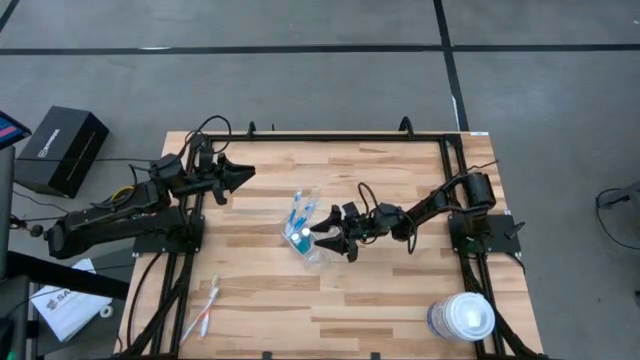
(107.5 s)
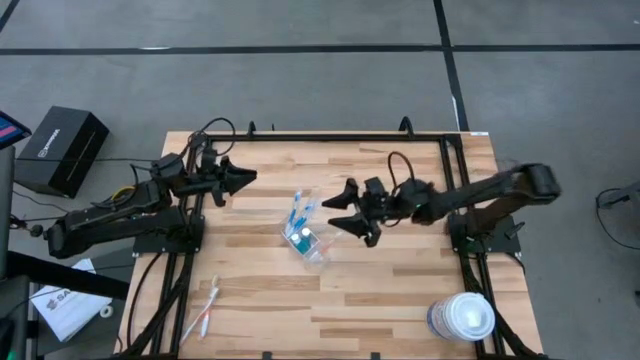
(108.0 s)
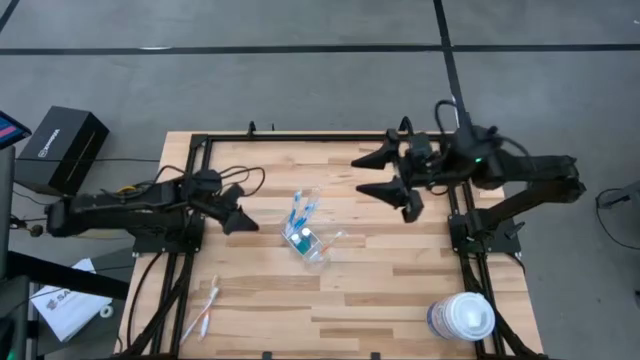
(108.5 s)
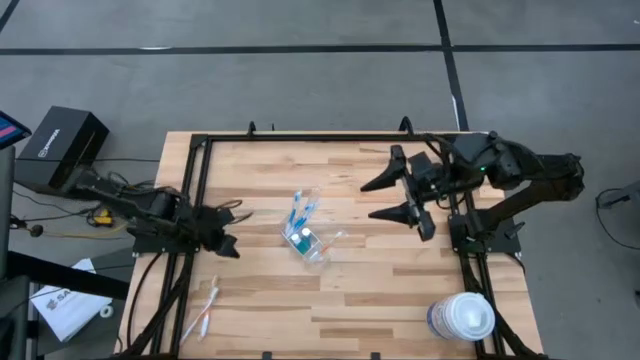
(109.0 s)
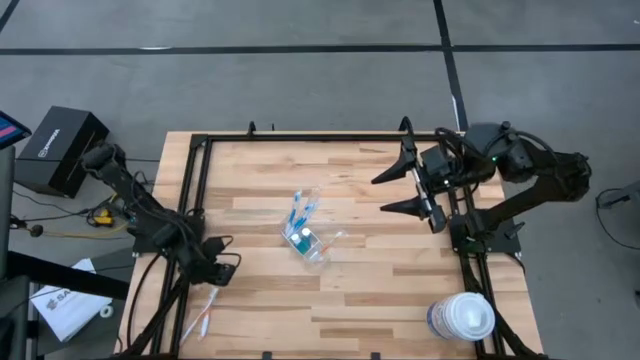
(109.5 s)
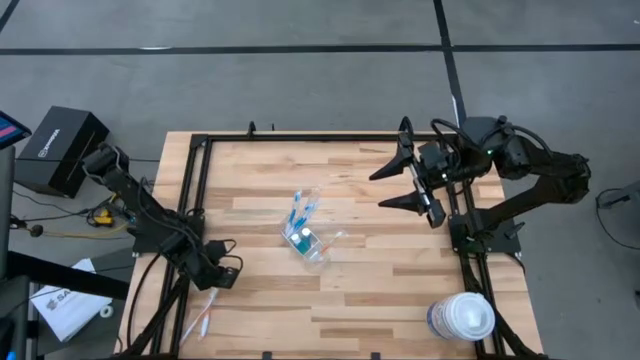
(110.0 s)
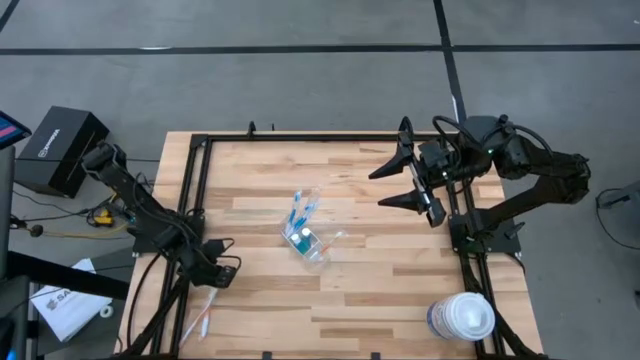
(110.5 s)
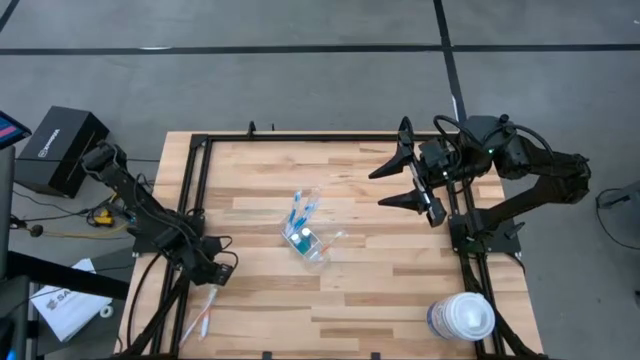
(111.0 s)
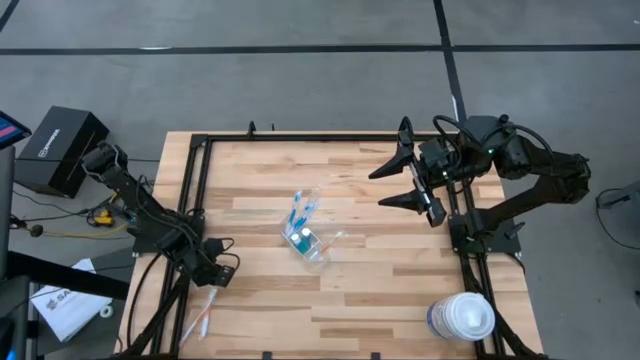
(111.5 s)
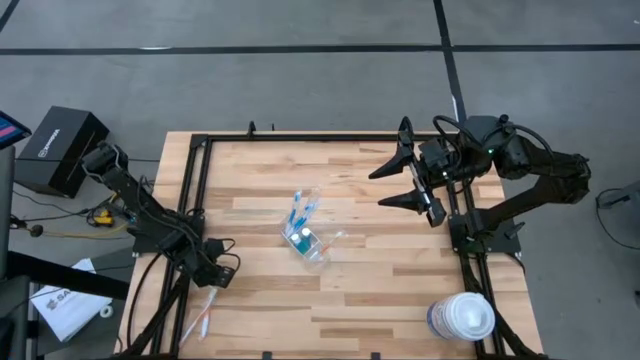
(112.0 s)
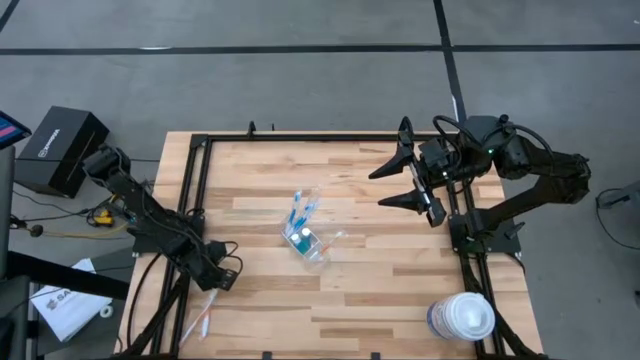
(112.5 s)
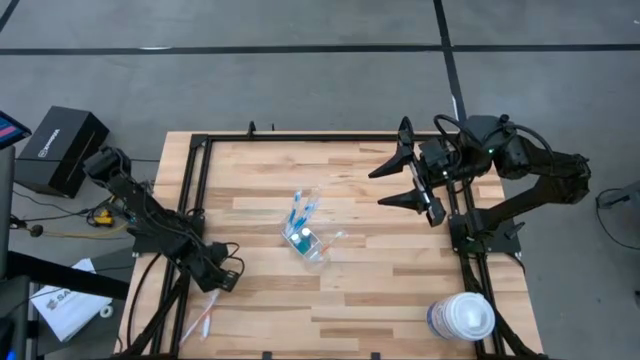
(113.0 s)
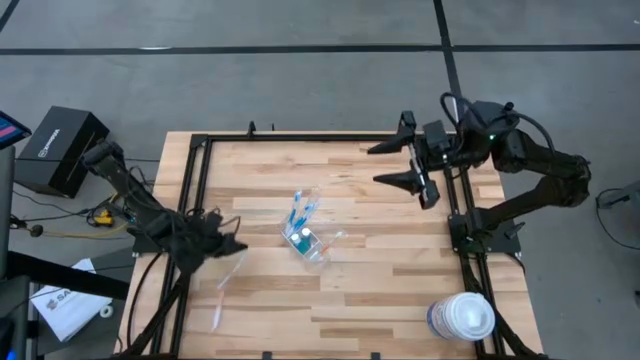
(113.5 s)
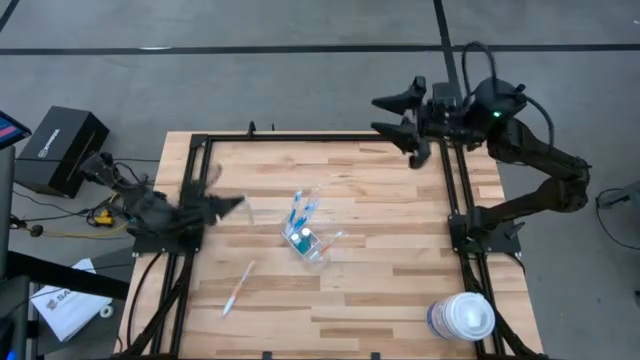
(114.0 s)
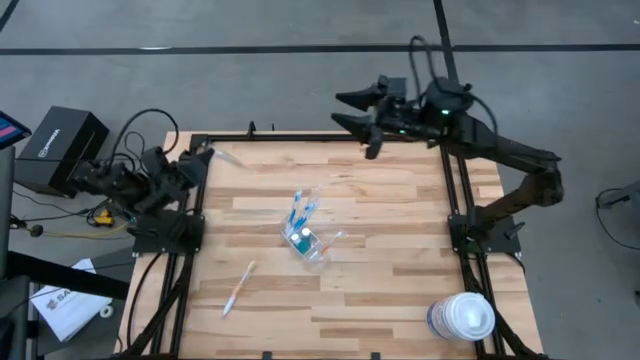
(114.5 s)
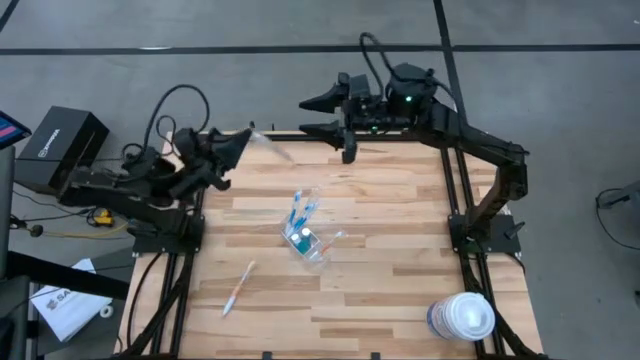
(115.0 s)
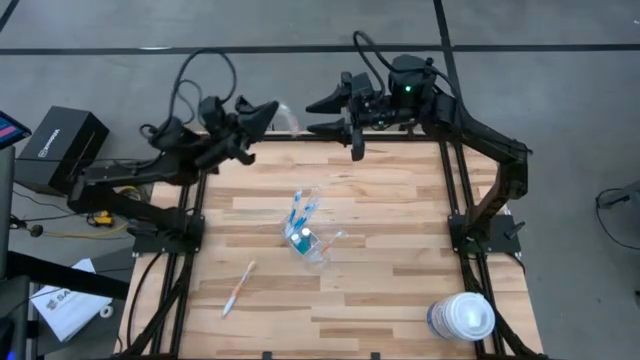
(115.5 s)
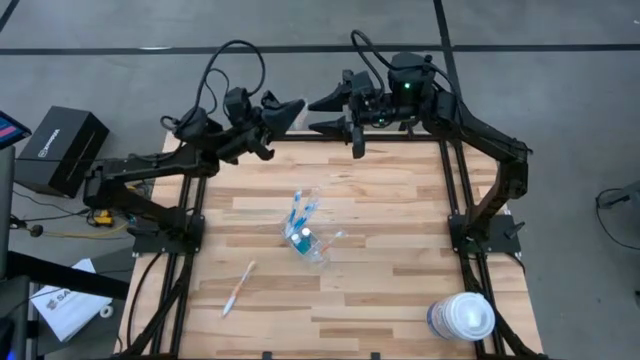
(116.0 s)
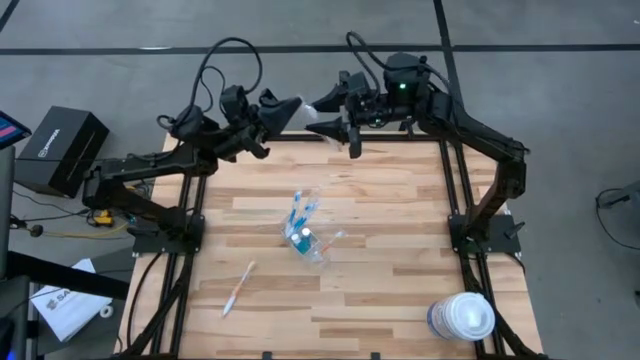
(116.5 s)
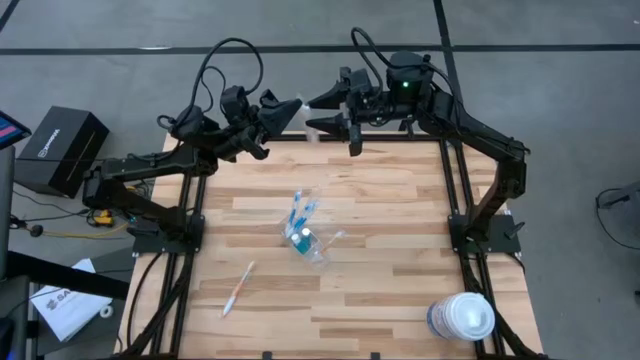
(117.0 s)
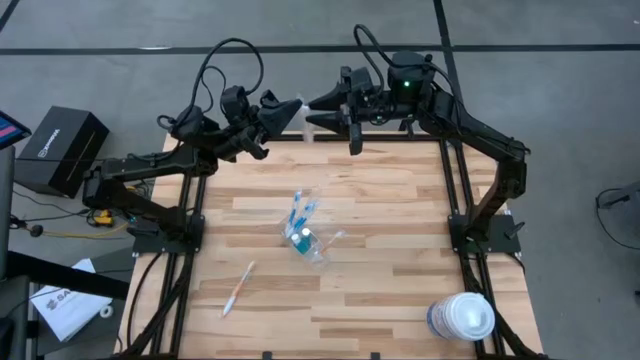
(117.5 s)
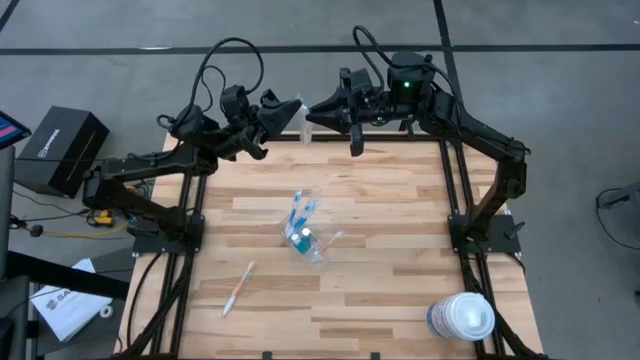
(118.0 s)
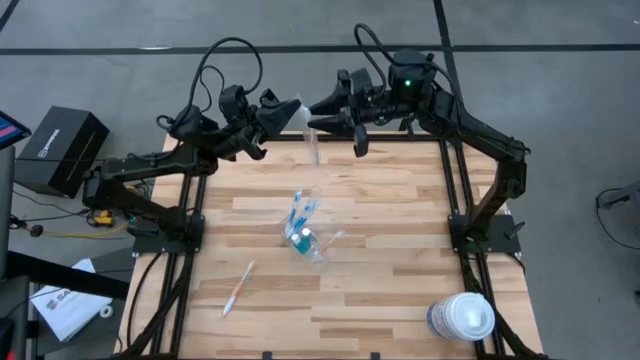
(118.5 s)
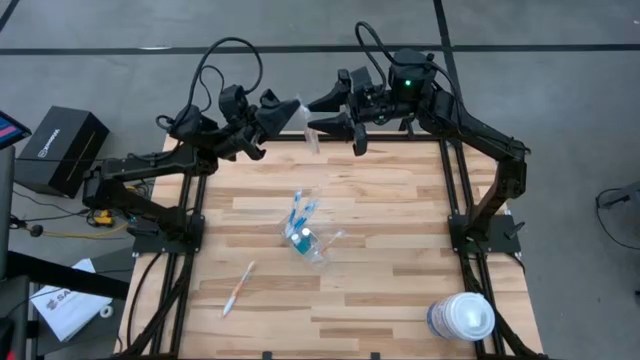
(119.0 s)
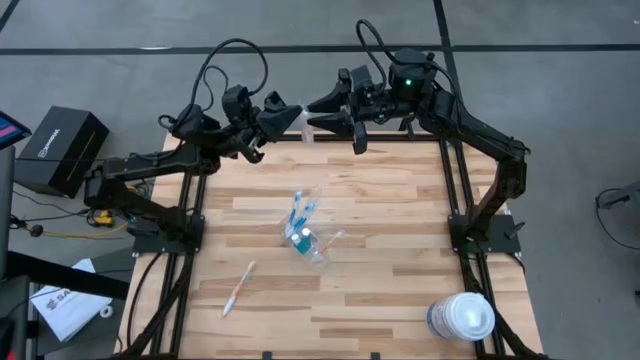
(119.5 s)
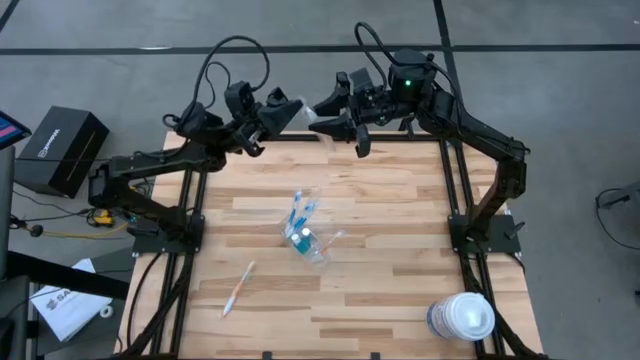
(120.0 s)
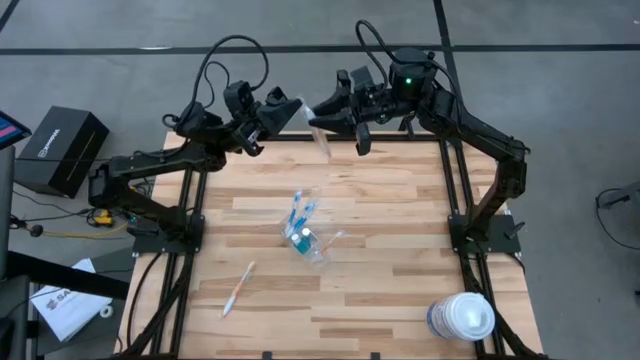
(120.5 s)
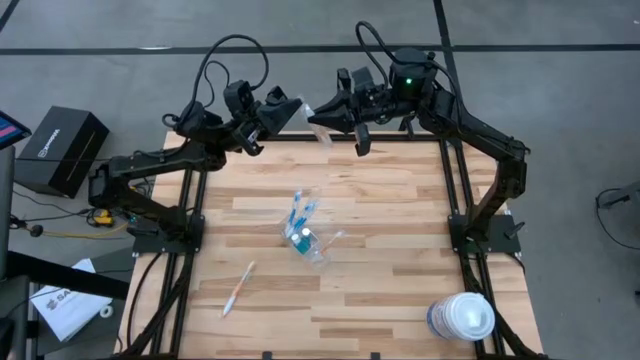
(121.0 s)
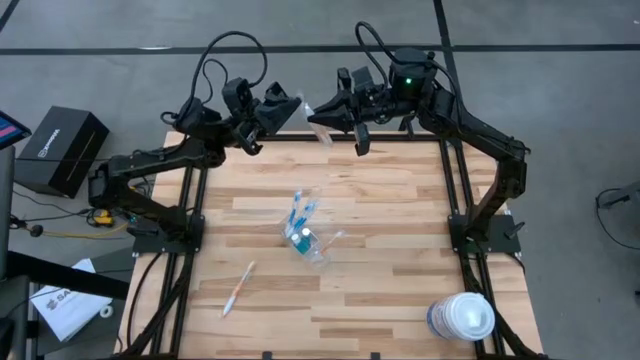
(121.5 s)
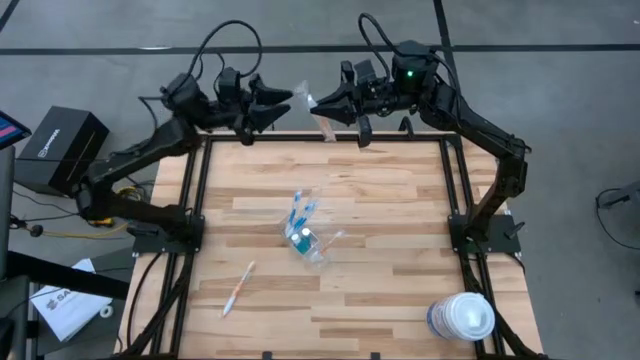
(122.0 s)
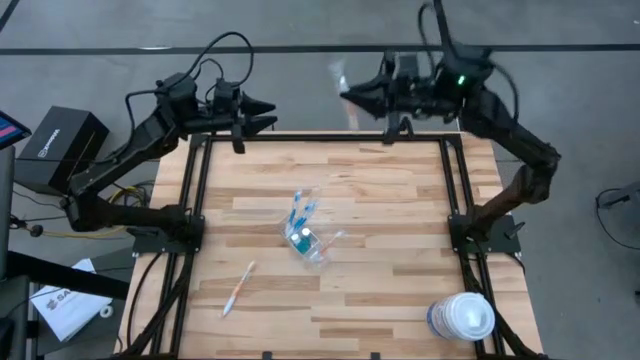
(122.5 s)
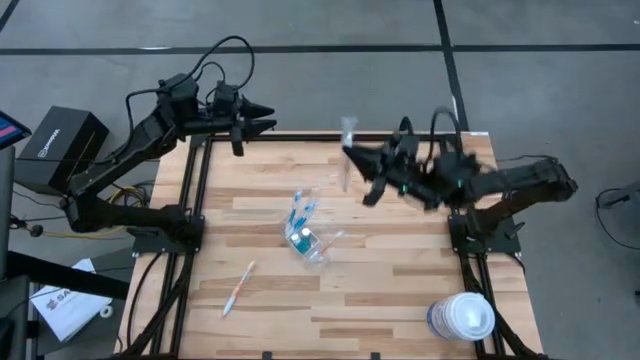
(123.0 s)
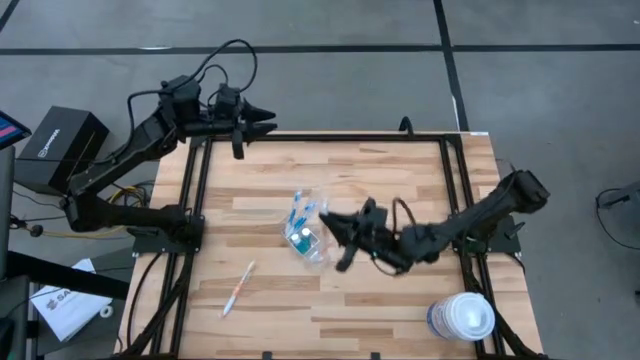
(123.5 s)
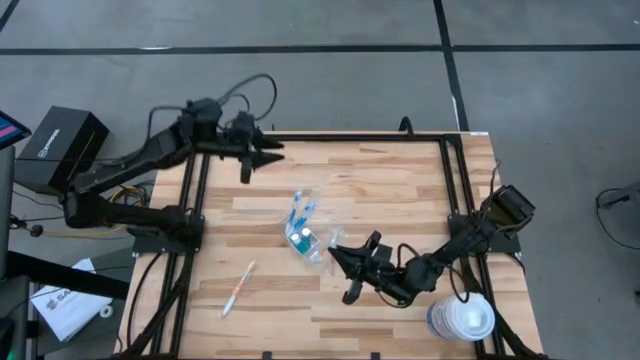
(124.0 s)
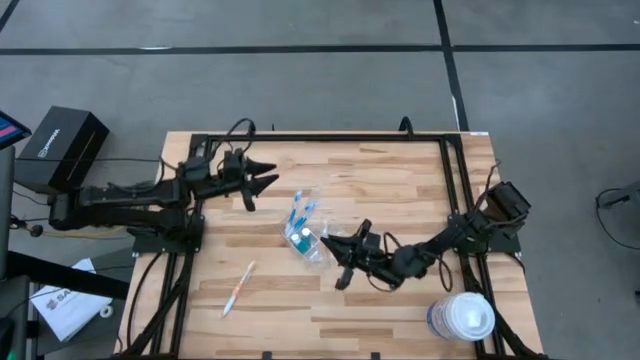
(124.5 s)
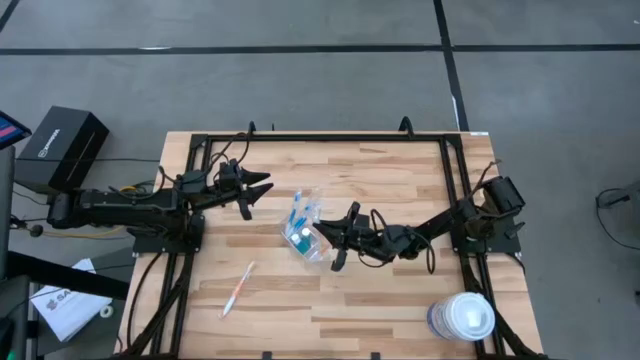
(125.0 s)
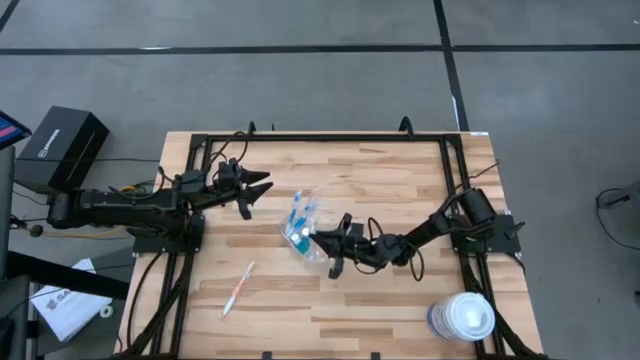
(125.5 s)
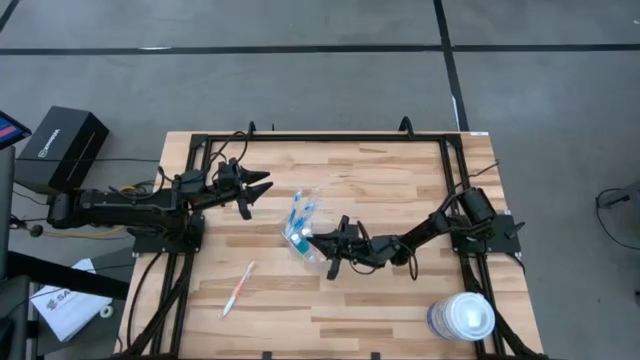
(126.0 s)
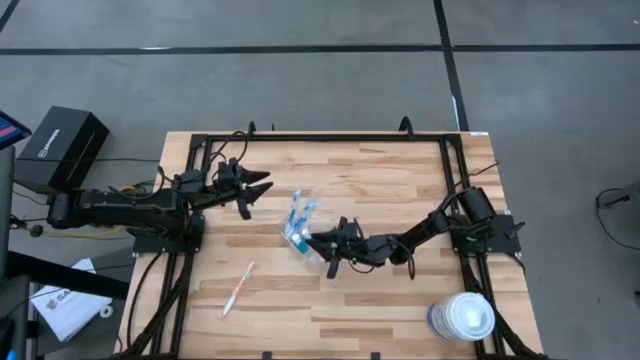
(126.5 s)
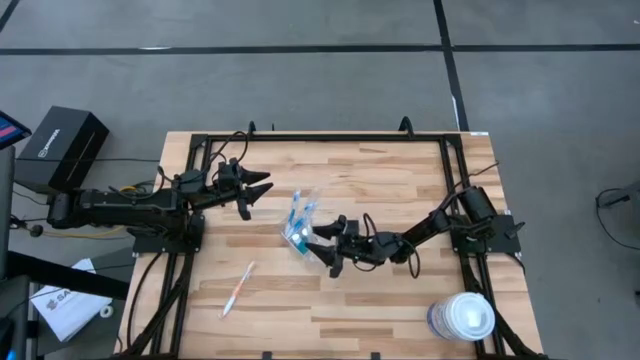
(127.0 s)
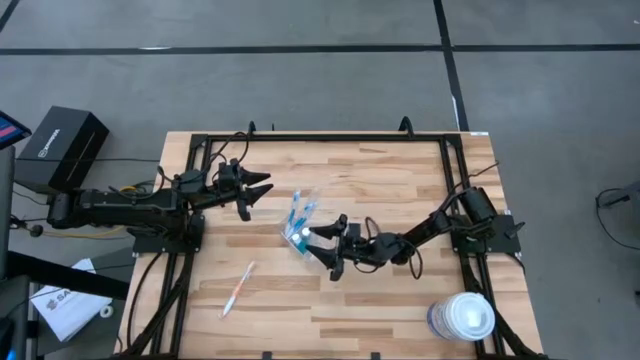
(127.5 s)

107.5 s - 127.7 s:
Task: Pick & Place toothbrushing station
Put the left orange toothbrush into the transparent organizer
